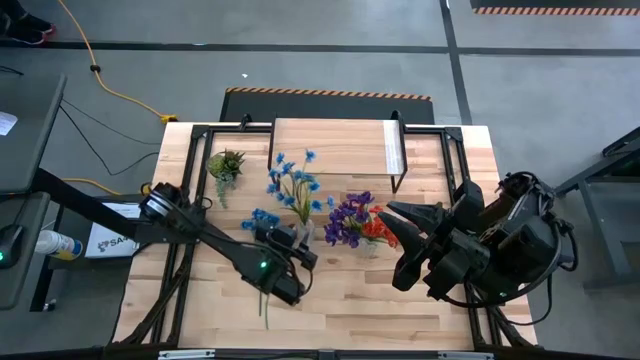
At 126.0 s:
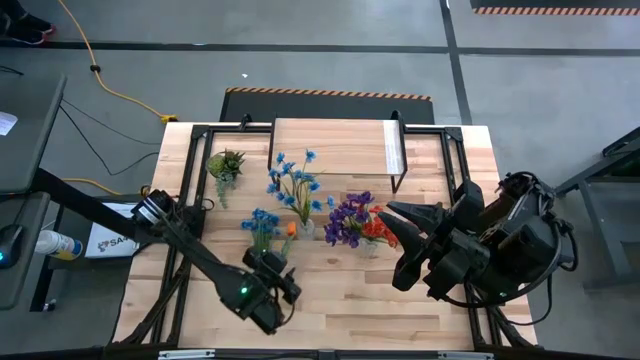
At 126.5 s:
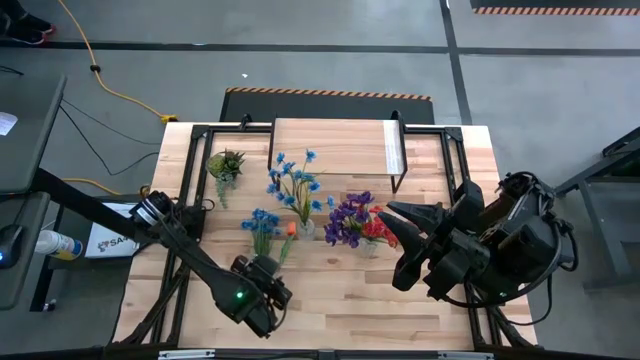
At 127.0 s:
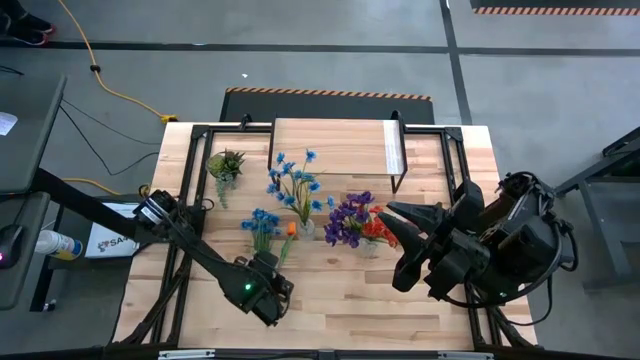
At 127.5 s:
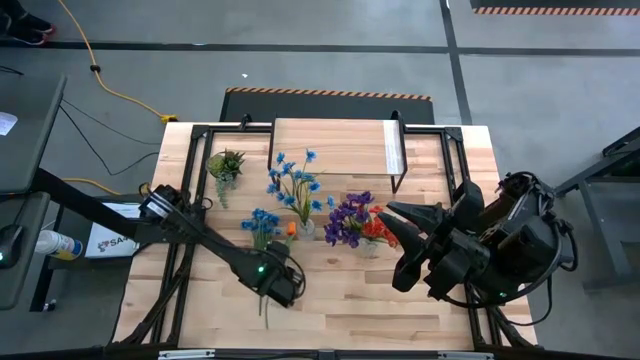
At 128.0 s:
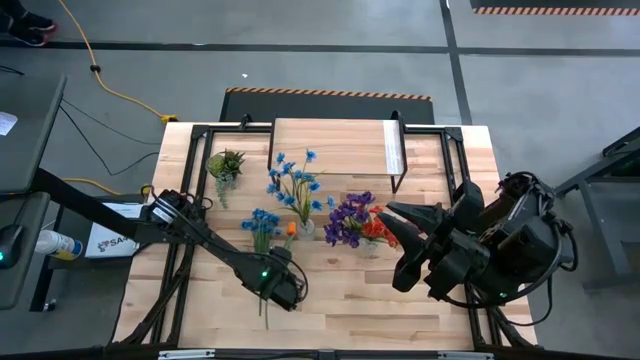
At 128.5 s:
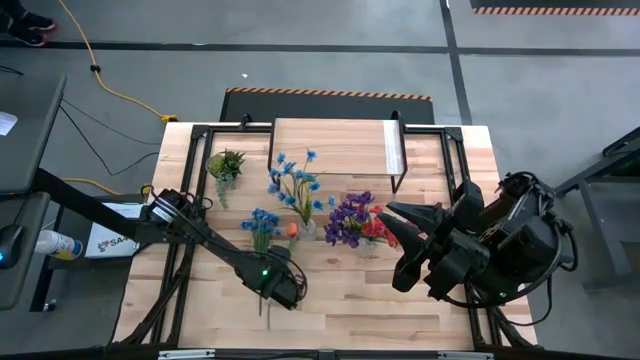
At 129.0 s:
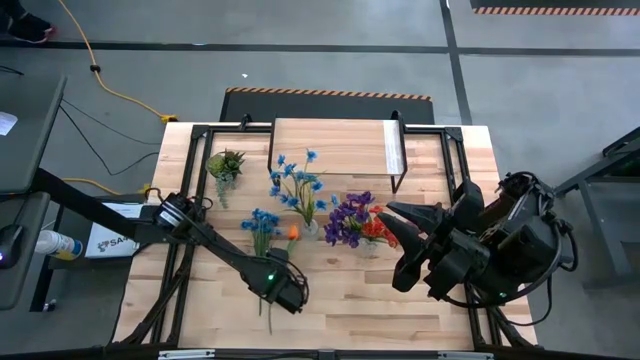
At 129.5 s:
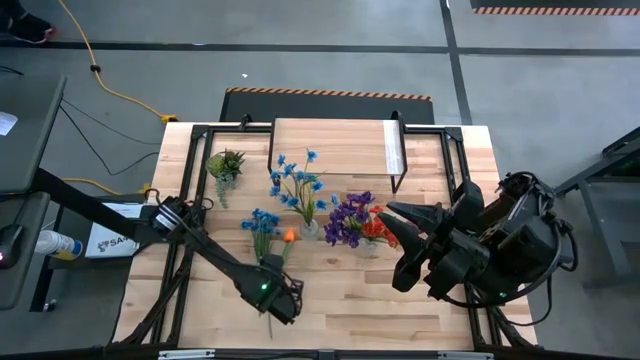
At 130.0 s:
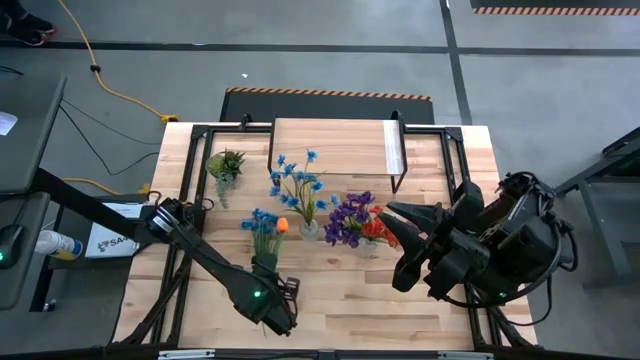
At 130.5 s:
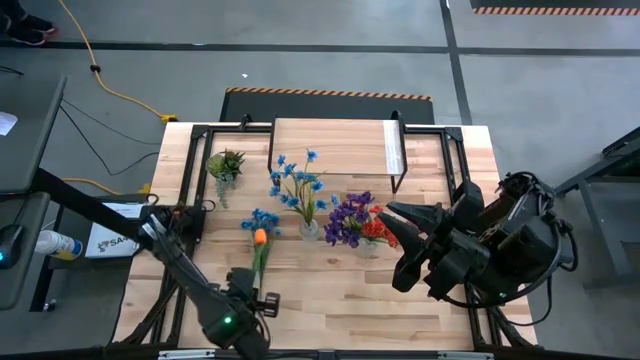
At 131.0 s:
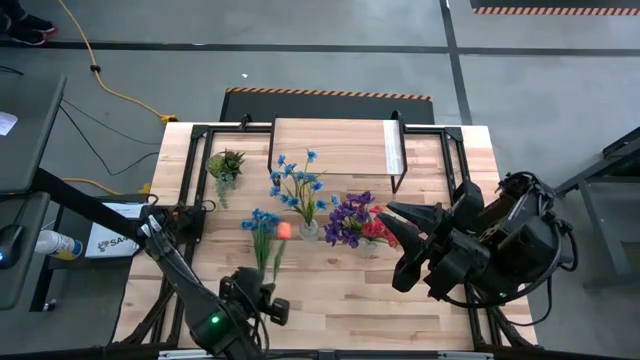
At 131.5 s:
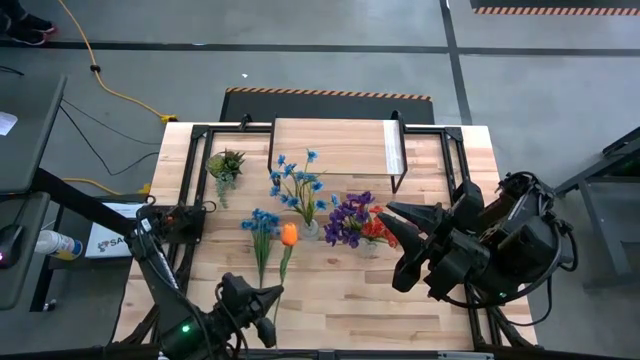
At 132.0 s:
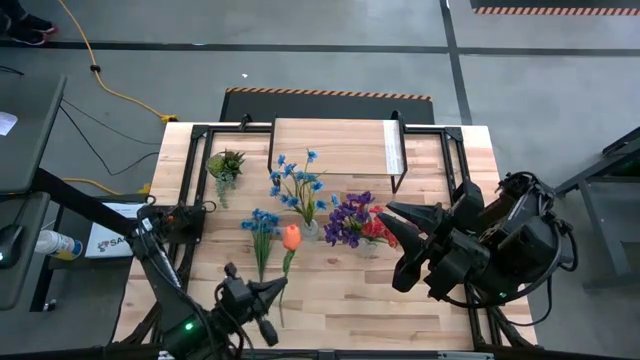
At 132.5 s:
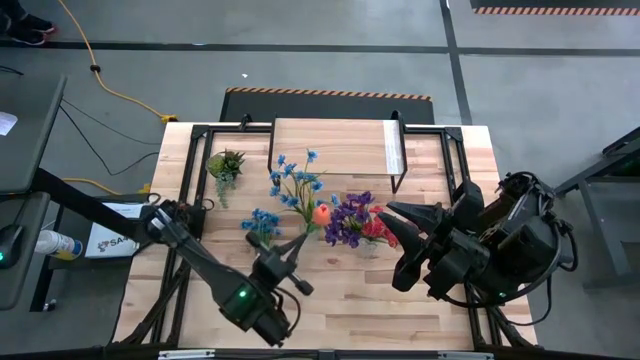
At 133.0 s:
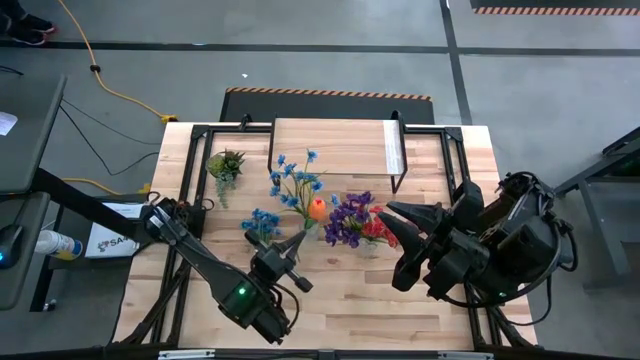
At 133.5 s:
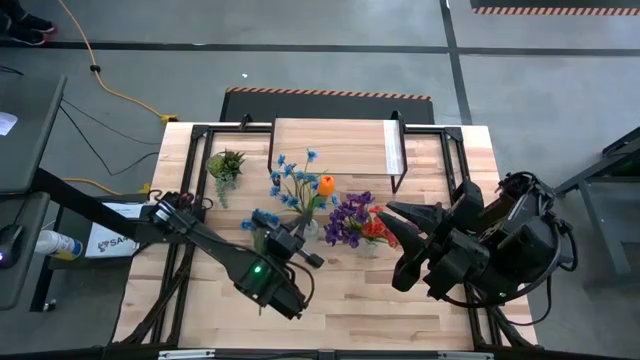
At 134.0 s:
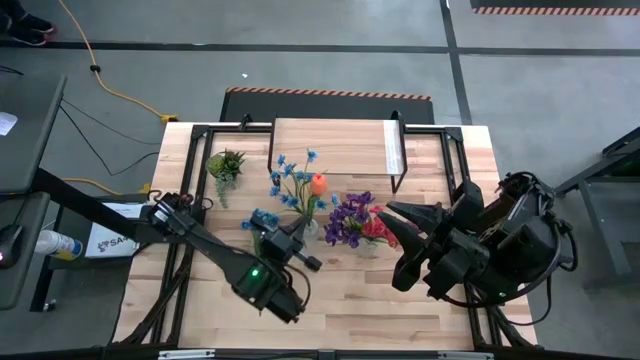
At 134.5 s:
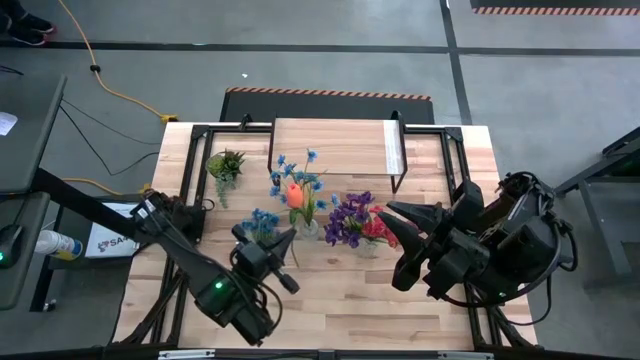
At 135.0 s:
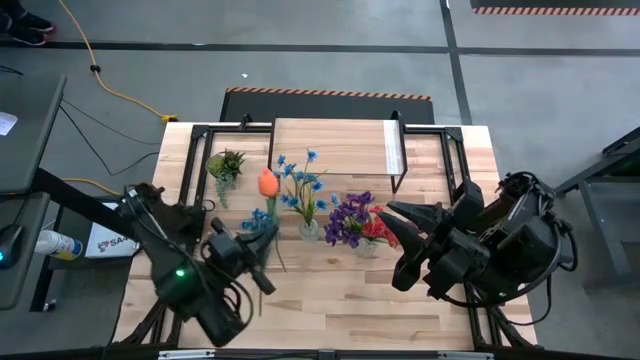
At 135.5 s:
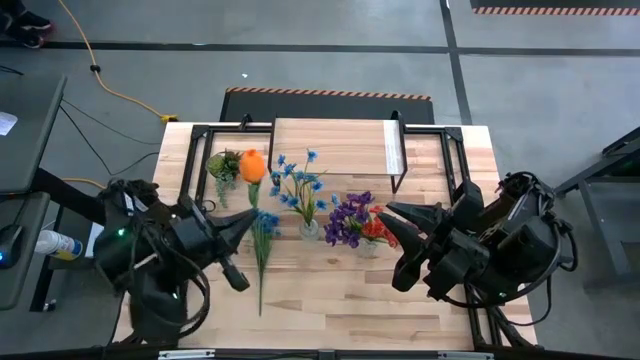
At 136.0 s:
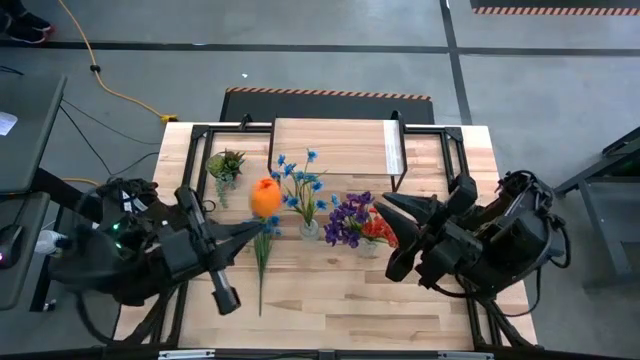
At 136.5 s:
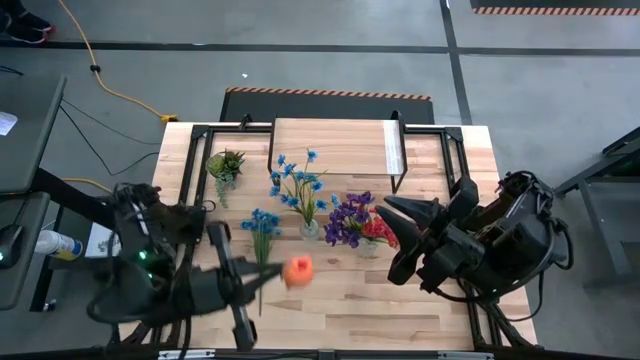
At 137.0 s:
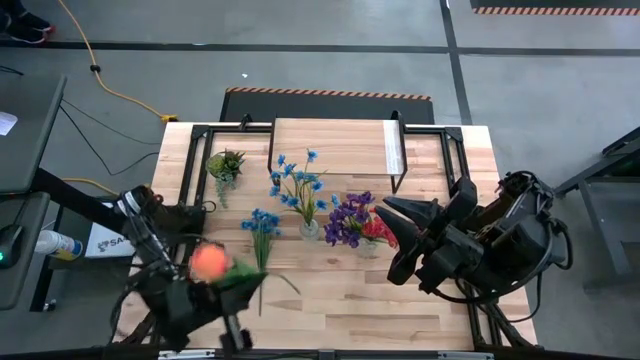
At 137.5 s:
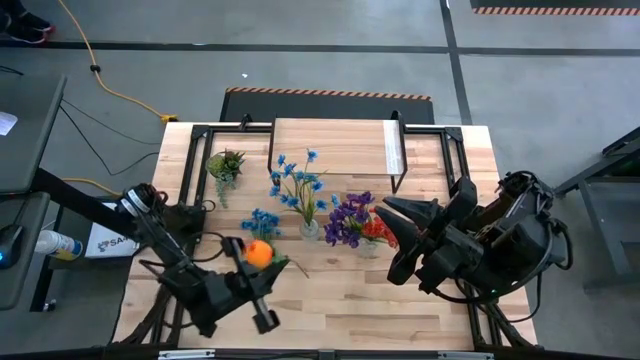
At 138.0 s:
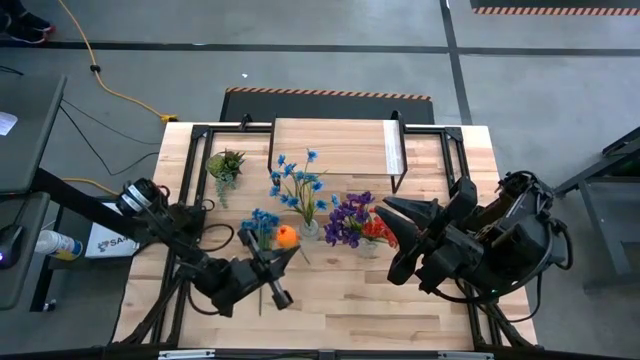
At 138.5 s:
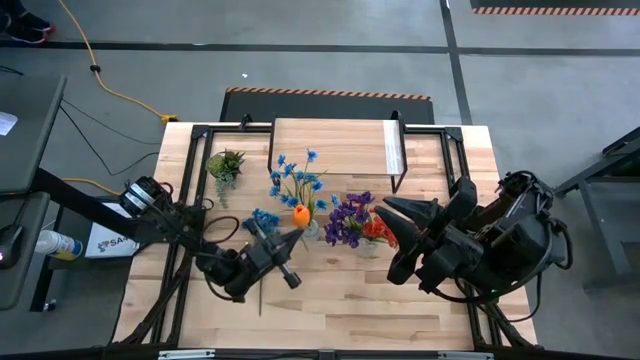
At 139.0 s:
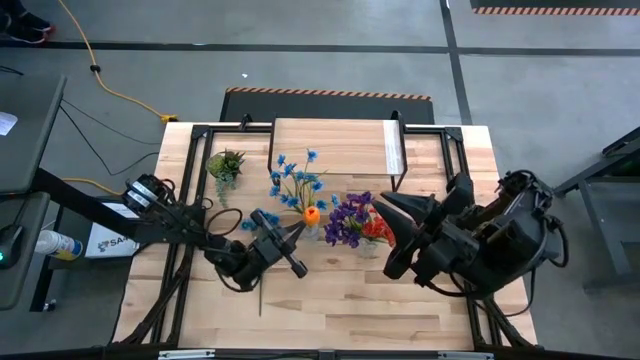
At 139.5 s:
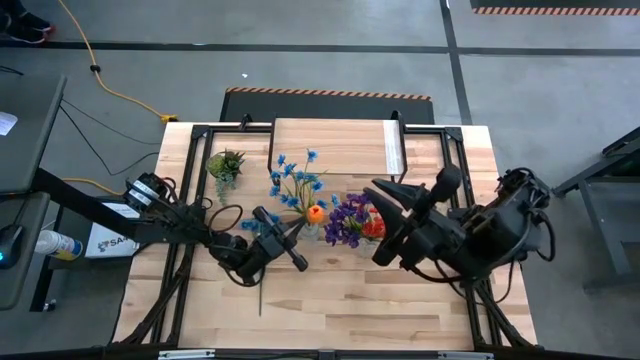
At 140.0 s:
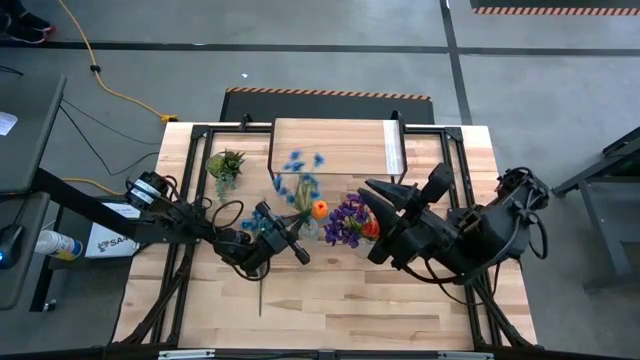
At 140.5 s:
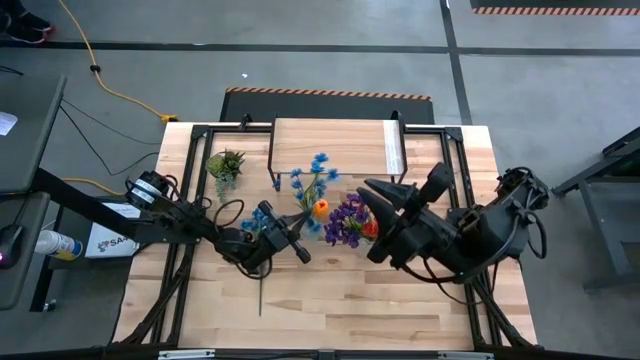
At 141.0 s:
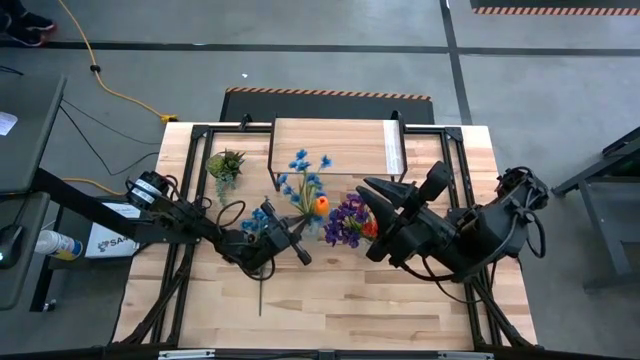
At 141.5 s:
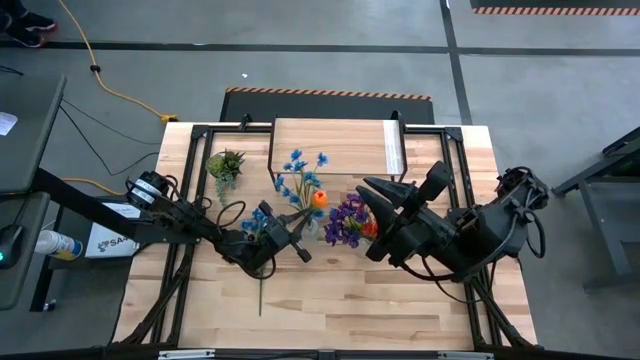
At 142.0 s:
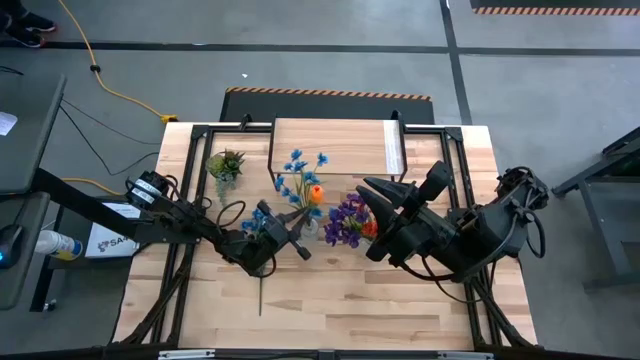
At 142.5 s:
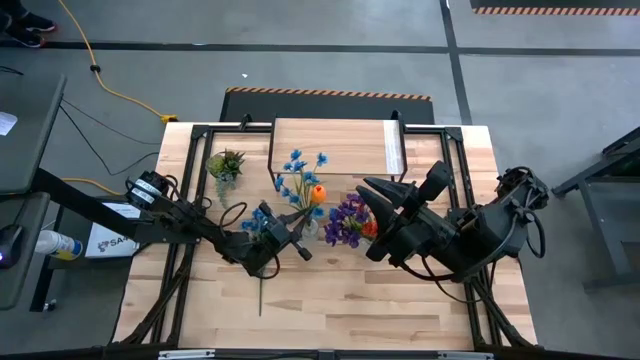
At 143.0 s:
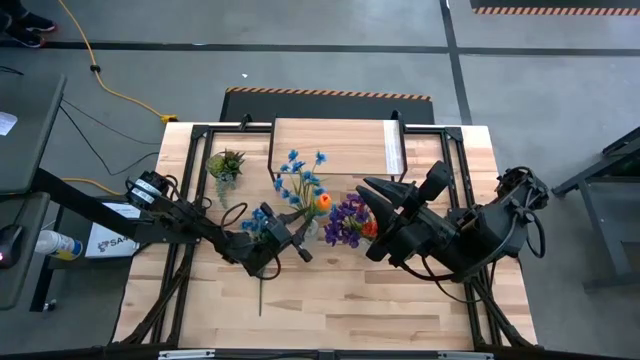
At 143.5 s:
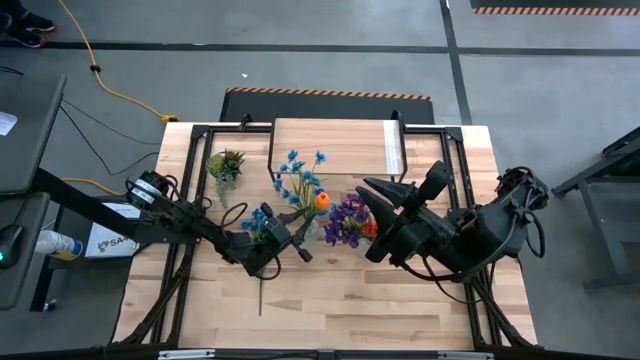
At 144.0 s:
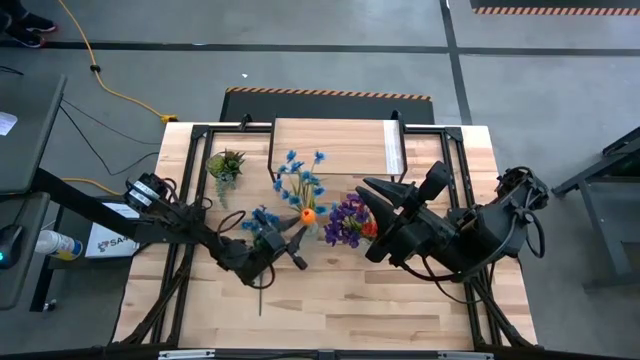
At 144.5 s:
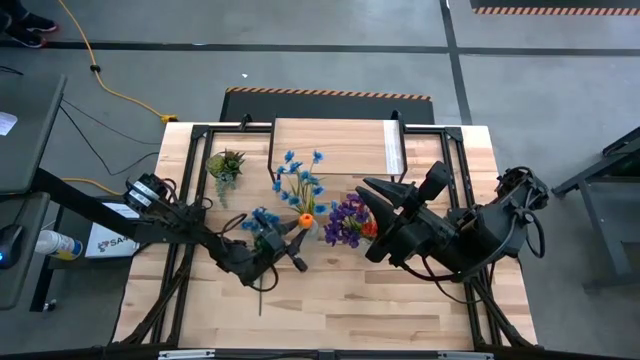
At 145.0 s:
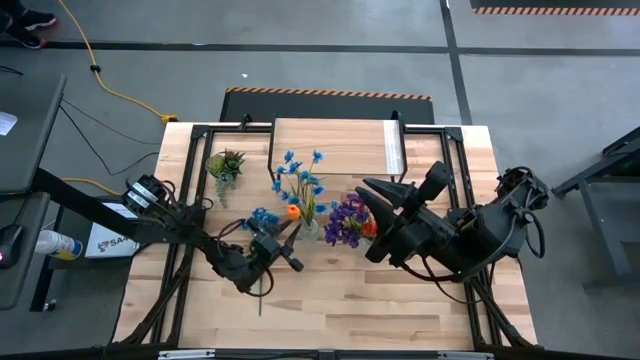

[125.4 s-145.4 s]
Task: Pick and place flowers into a vace then onto a shelf
Put the orange flower into the left transparent flower vase

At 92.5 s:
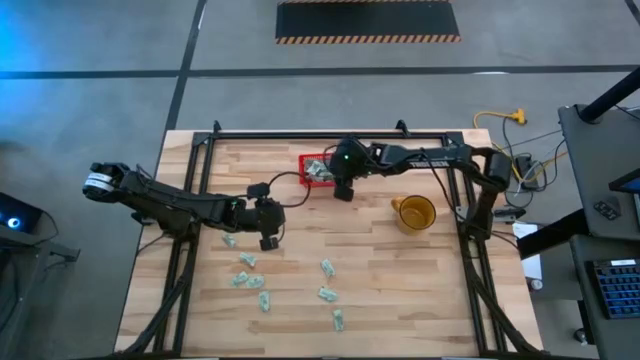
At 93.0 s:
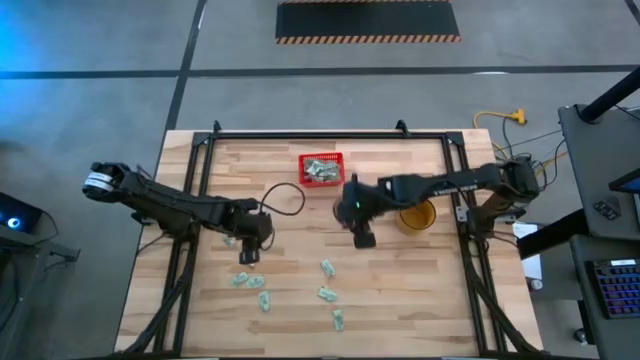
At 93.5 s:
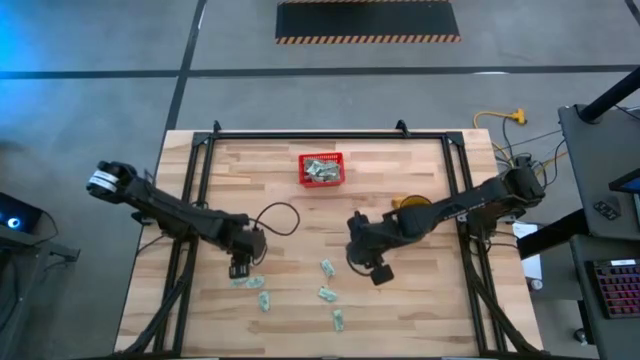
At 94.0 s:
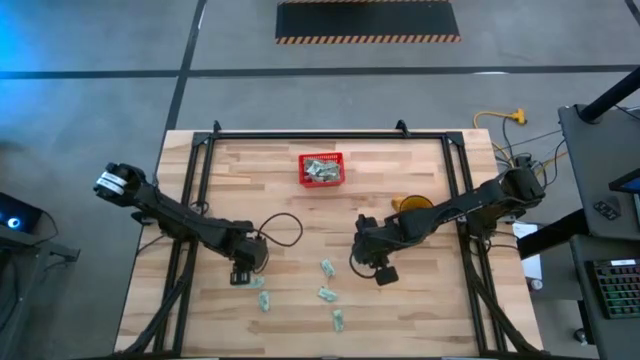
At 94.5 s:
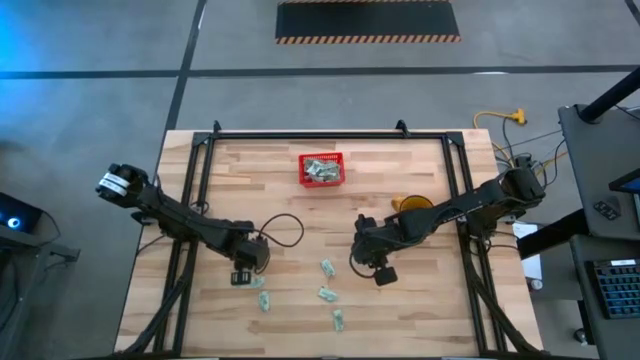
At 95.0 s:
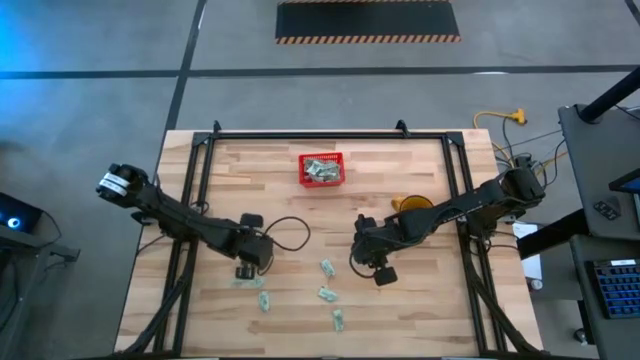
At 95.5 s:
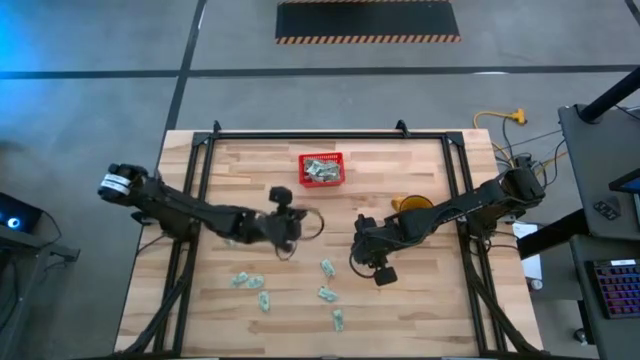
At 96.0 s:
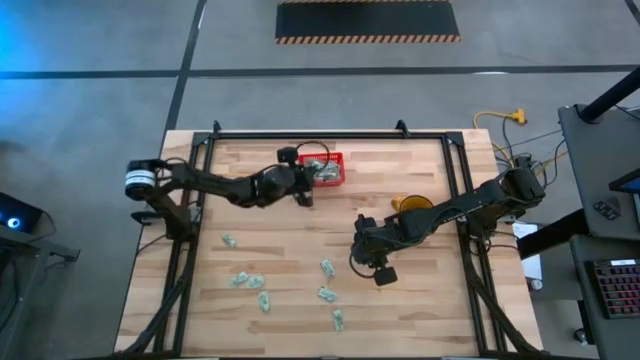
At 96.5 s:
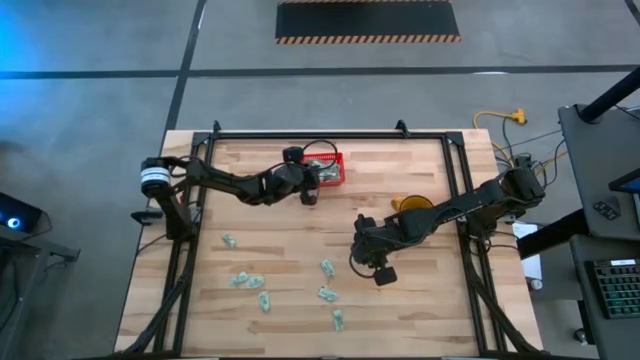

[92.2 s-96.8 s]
Task: Pick and place Stevia / Truvia into bins
Put the white stevia packet into the red bin
